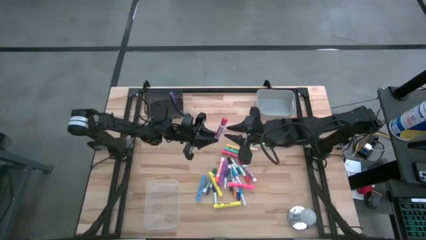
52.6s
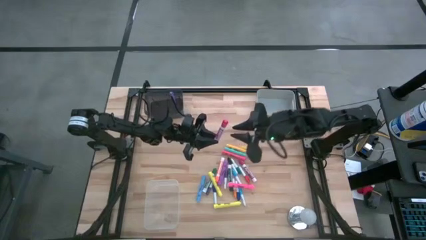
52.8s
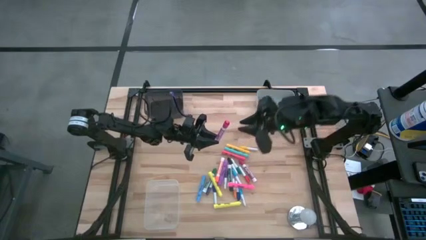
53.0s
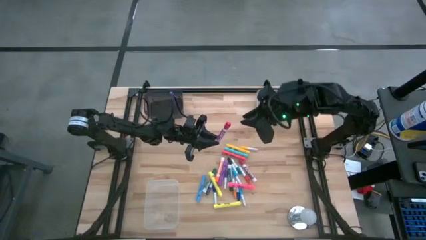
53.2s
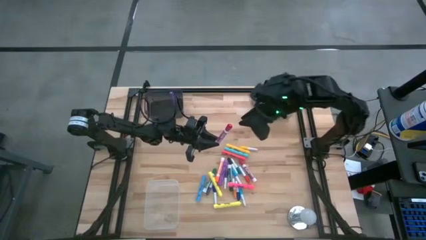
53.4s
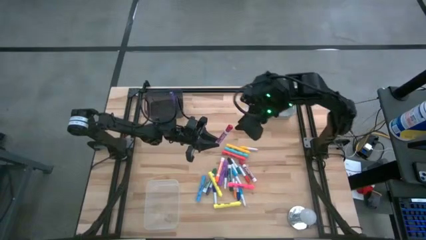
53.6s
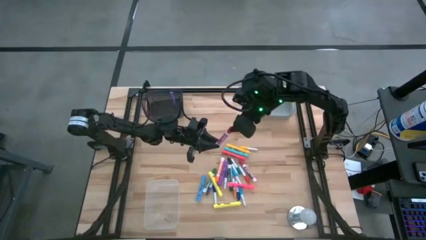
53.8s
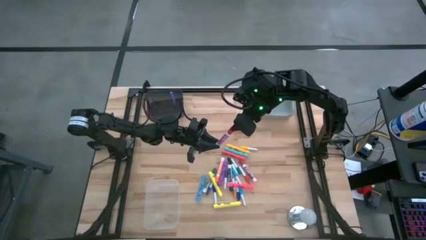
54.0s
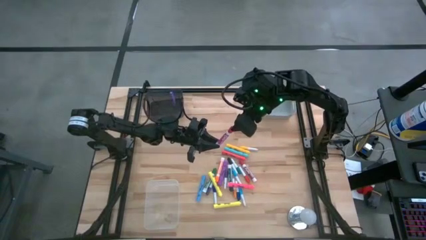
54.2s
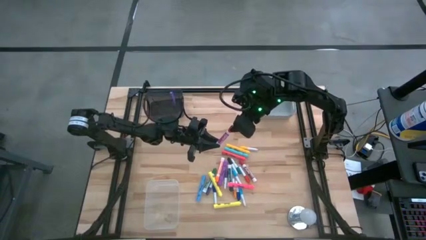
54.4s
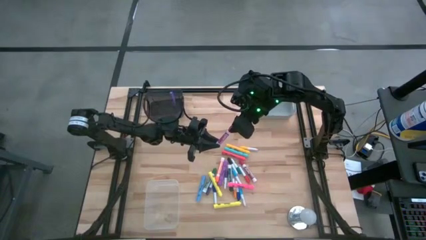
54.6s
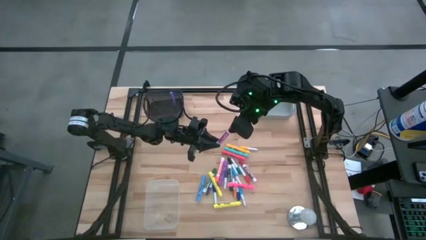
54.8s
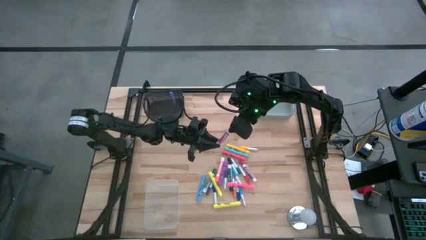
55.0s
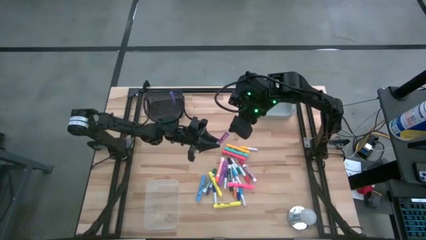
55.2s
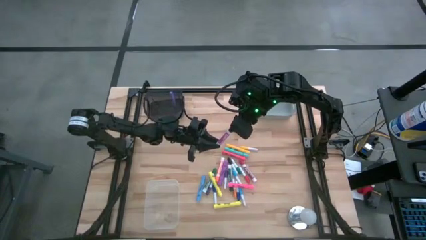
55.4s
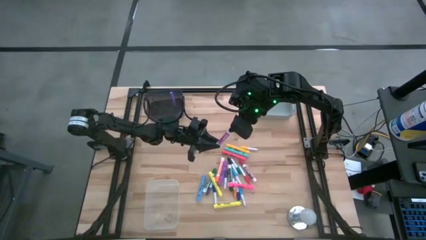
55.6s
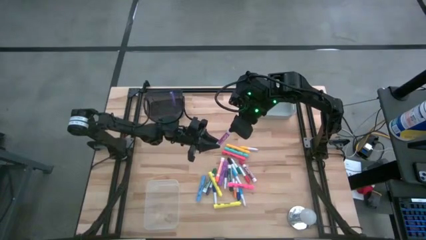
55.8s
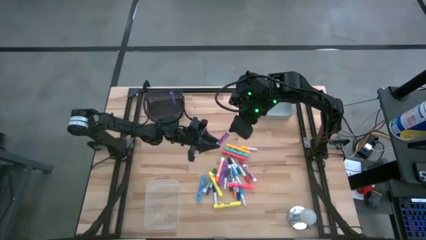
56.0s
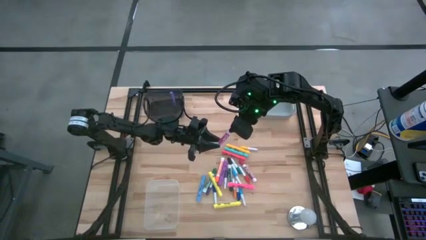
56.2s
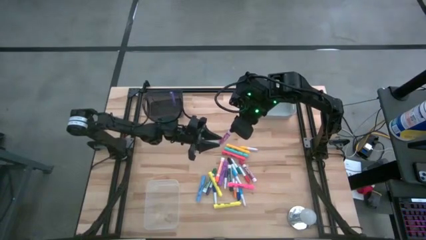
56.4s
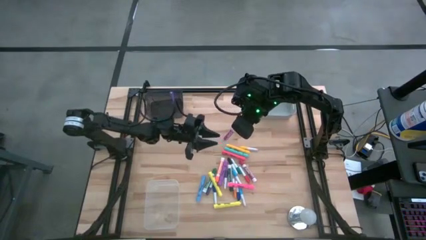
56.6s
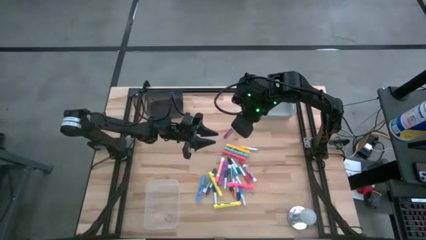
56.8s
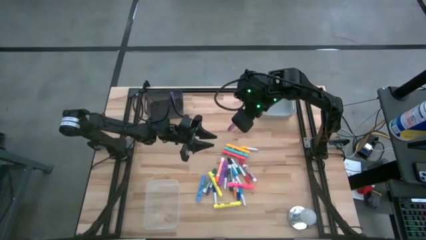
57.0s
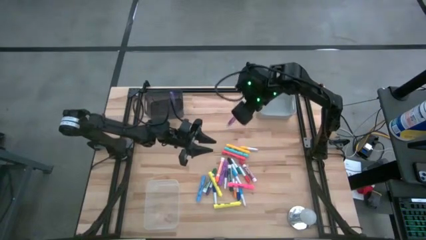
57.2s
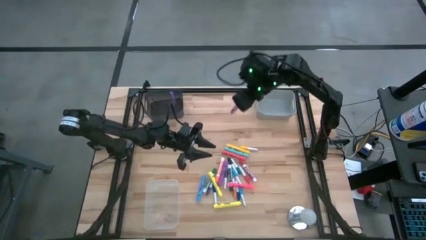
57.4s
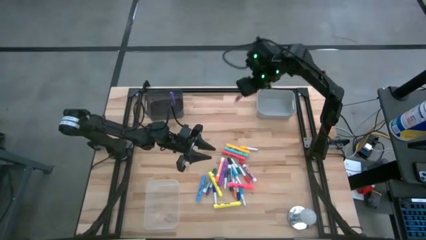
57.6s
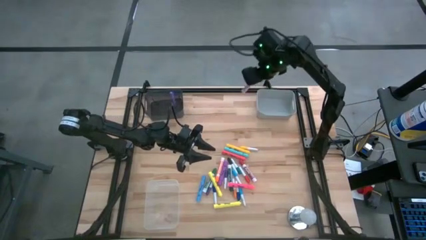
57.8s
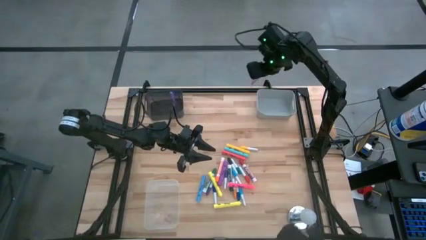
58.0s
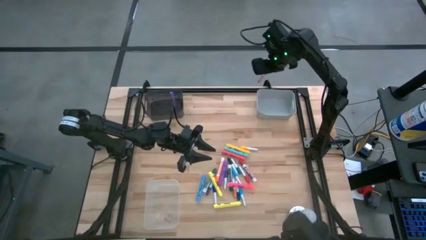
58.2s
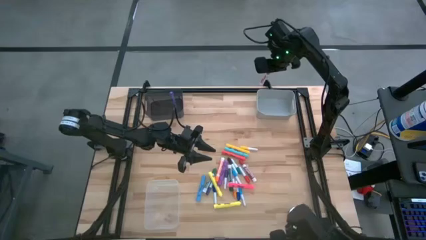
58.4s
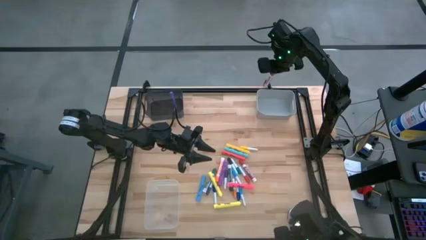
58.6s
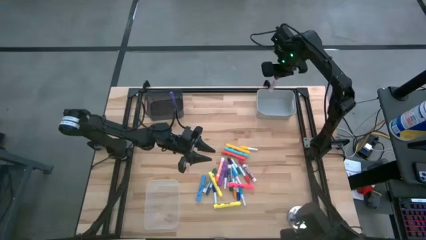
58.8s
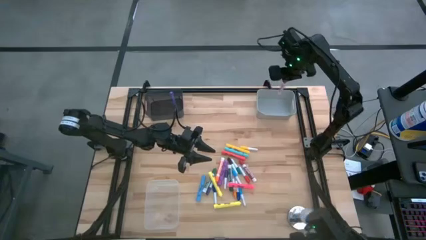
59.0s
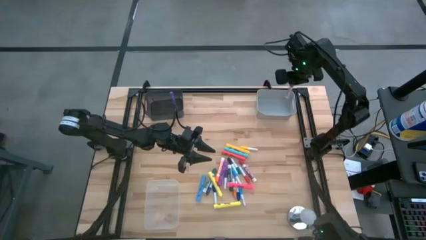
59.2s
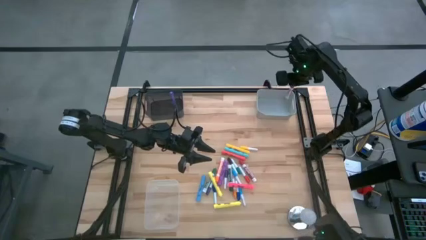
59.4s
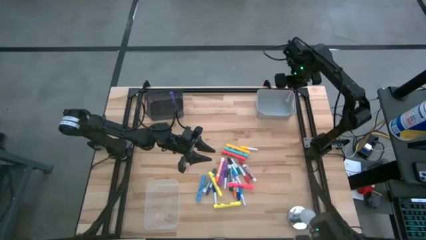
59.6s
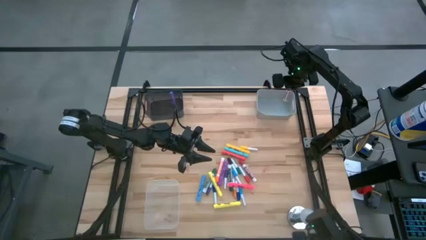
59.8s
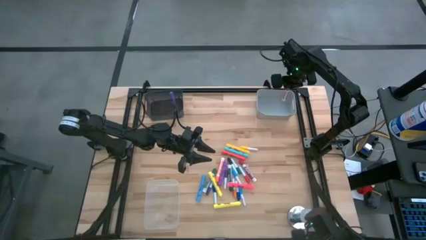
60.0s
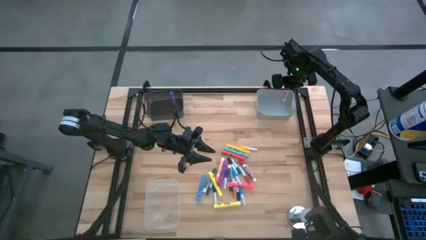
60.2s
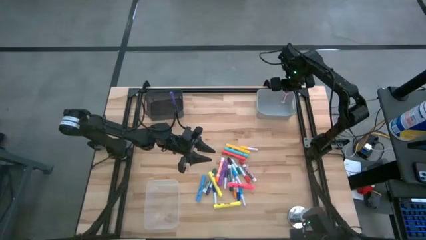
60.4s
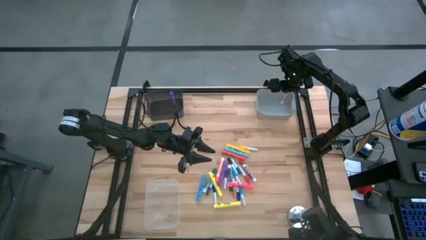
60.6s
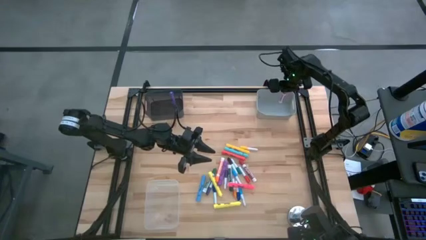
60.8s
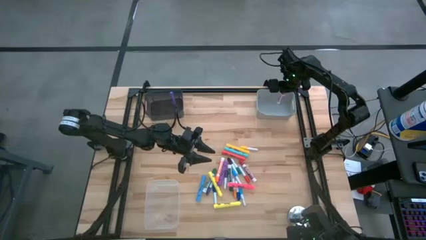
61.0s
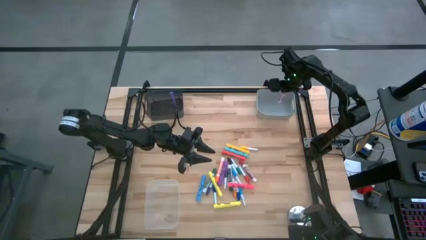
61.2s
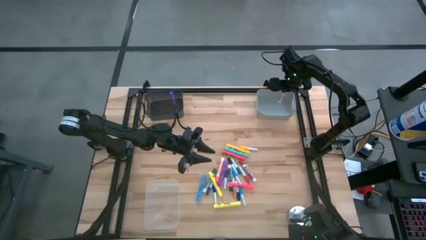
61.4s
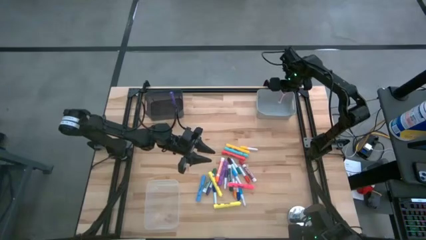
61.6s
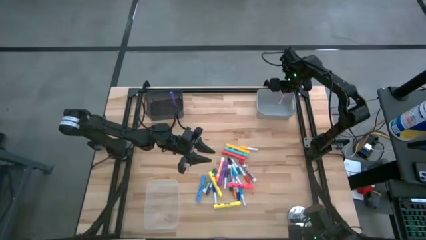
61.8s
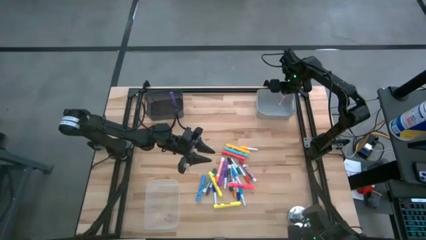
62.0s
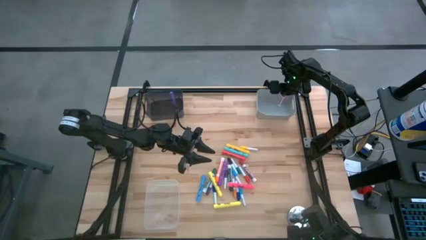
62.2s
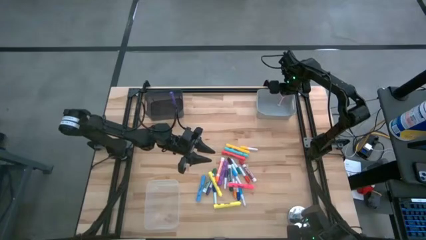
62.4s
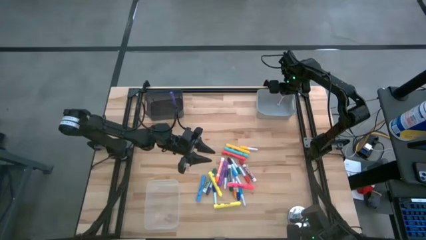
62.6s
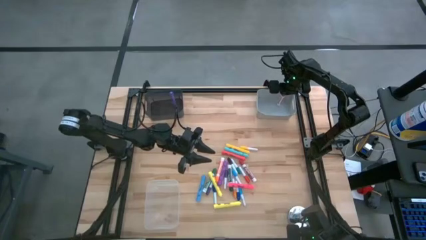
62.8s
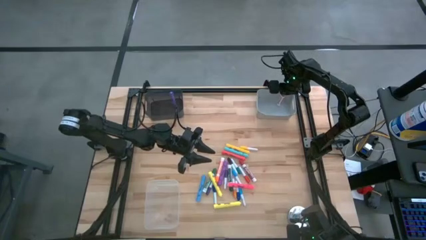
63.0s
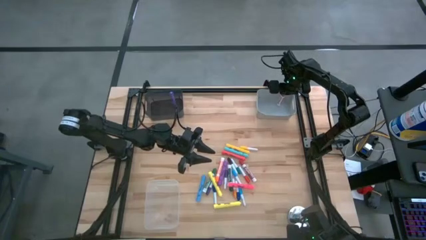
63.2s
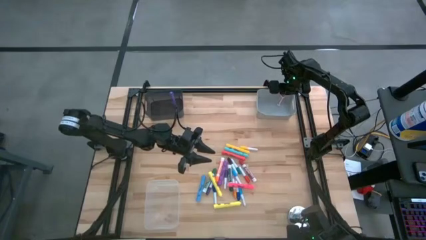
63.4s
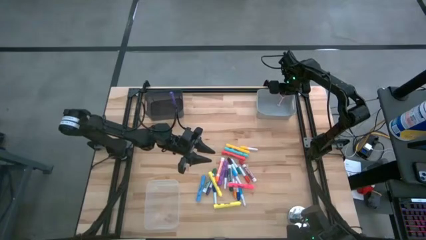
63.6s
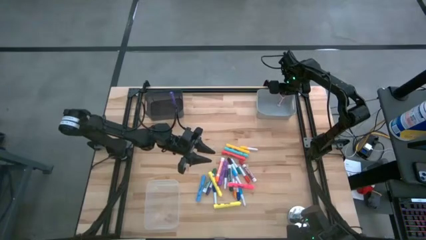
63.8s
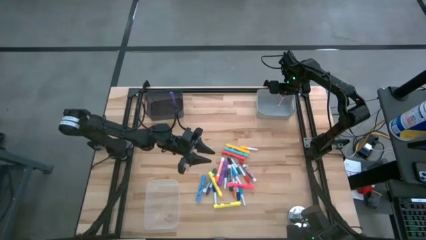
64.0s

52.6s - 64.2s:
Task: Pick & Place Markers
Put the pink marker pen into the gray bin

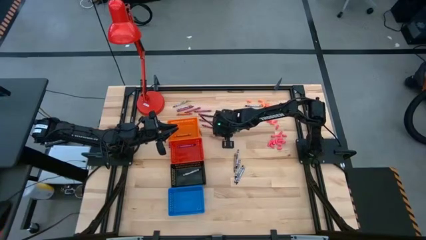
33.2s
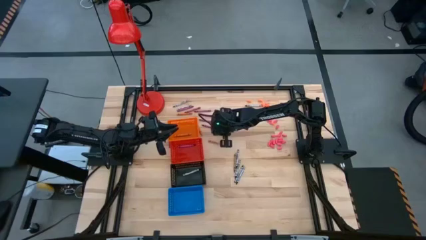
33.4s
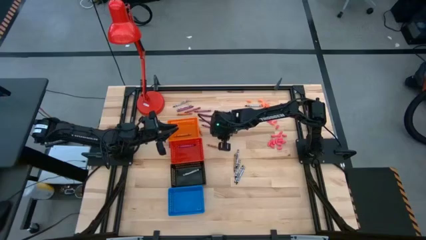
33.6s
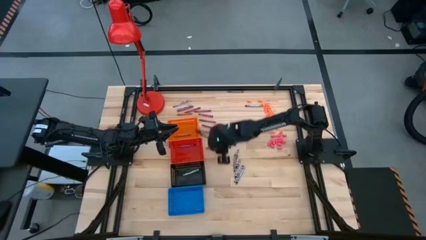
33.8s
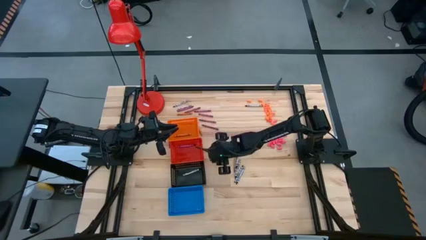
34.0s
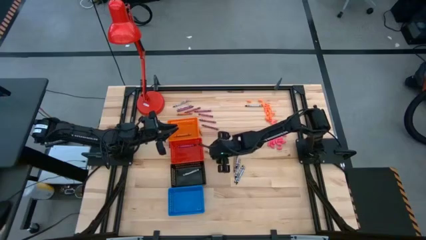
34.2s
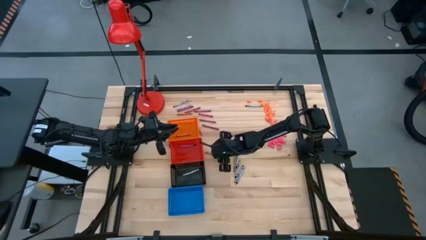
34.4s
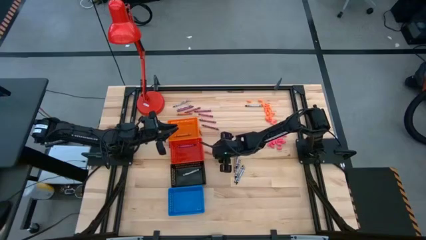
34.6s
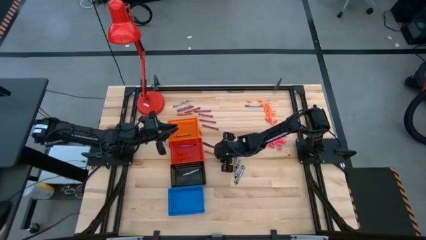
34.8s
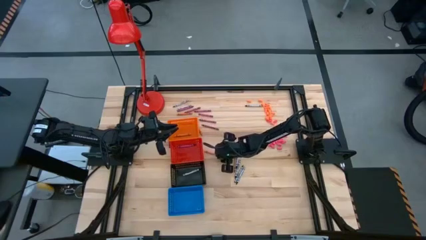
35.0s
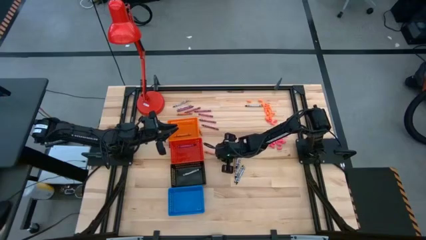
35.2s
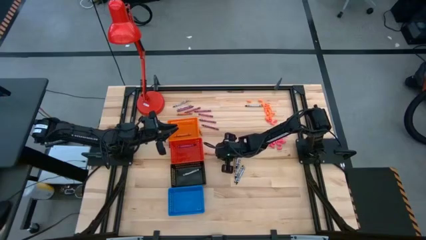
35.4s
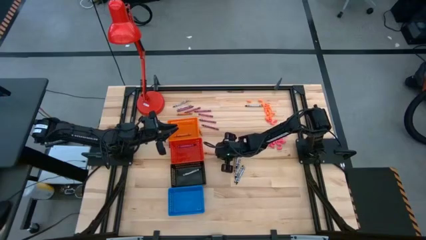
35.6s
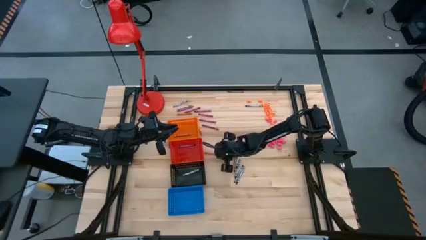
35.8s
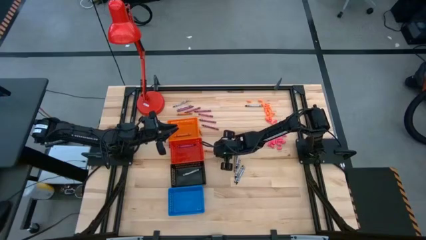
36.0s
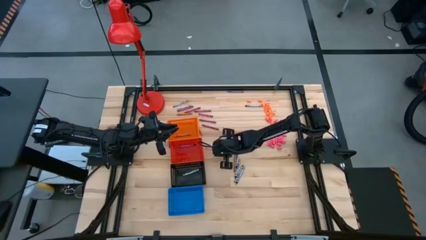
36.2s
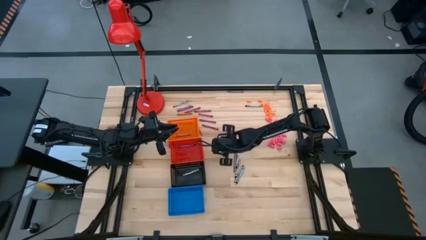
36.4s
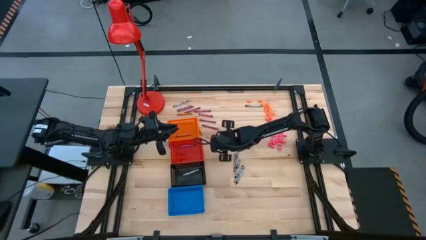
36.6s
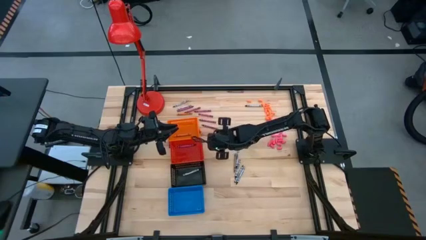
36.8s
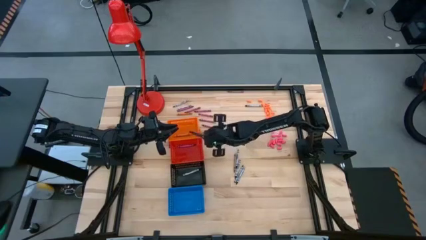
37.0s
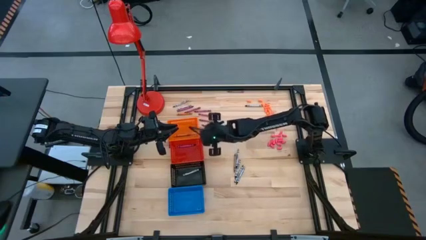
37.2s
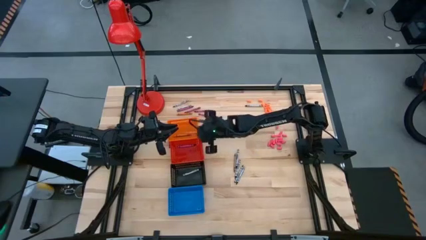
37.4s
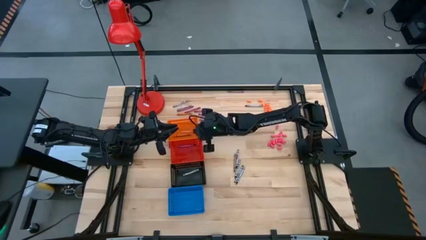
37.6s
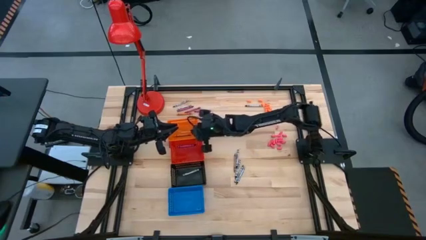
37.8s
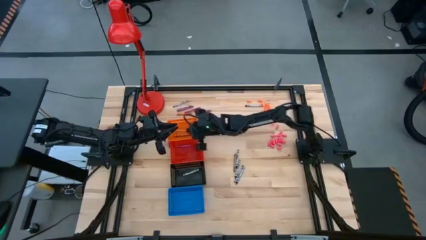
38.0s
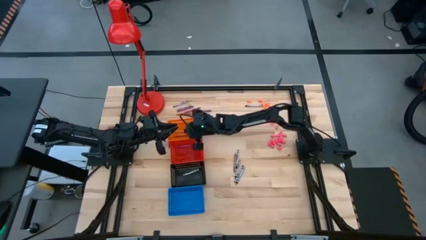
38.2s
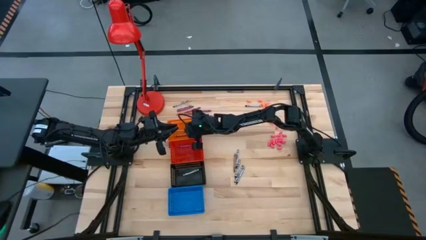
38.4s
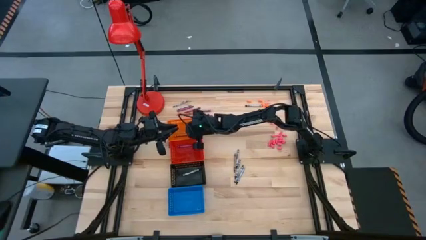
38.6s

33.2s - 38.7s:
Task: Sort crayons
Put the orange crayon into the orange basket
